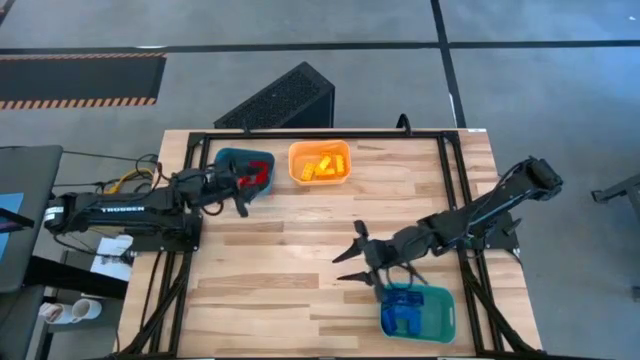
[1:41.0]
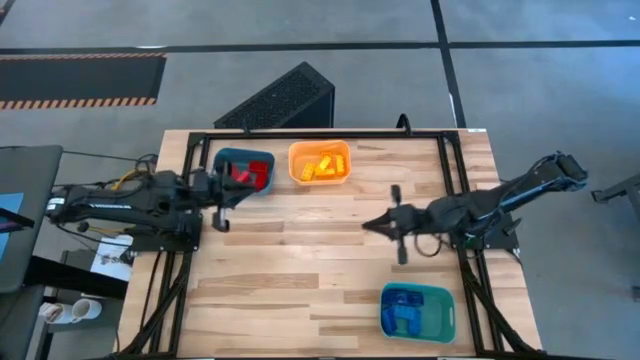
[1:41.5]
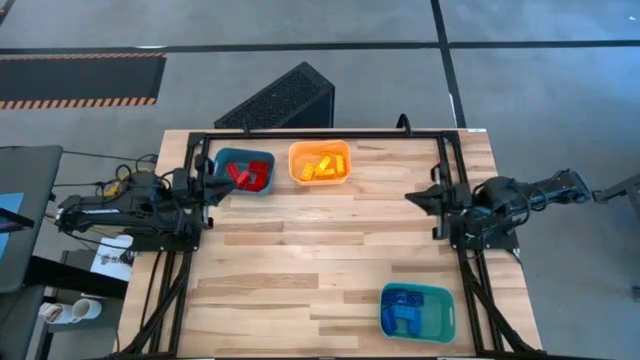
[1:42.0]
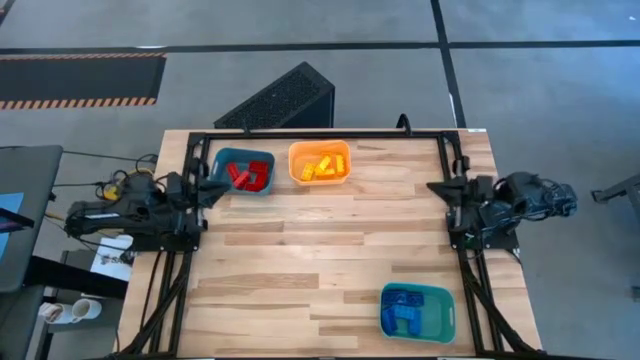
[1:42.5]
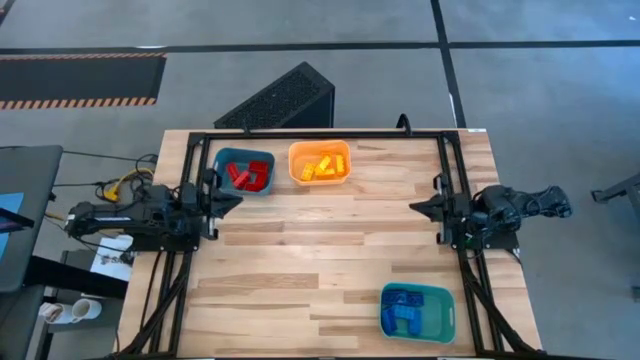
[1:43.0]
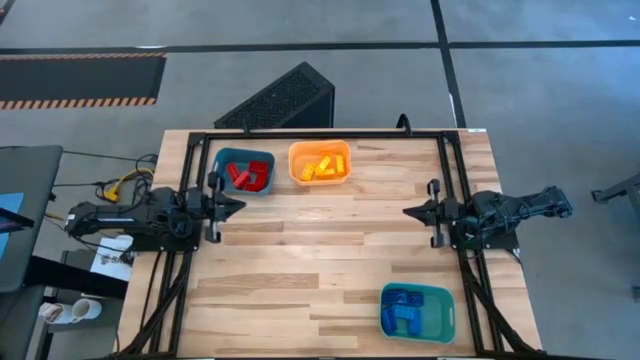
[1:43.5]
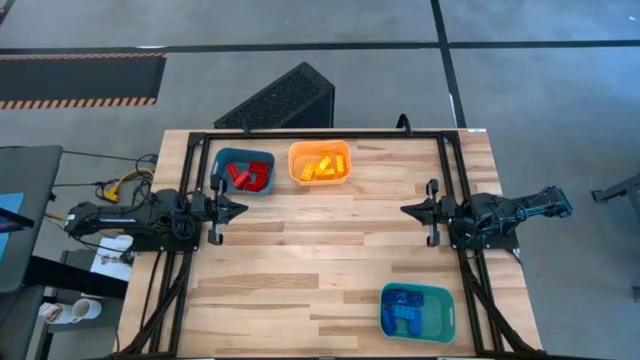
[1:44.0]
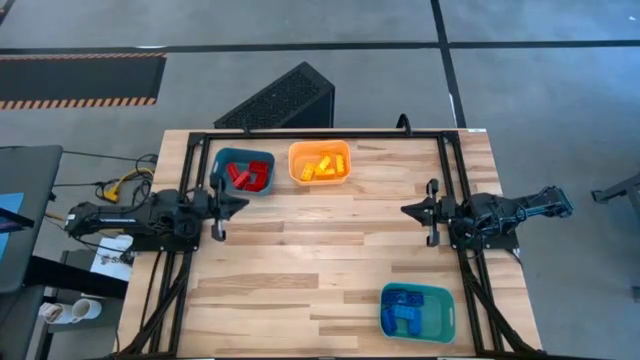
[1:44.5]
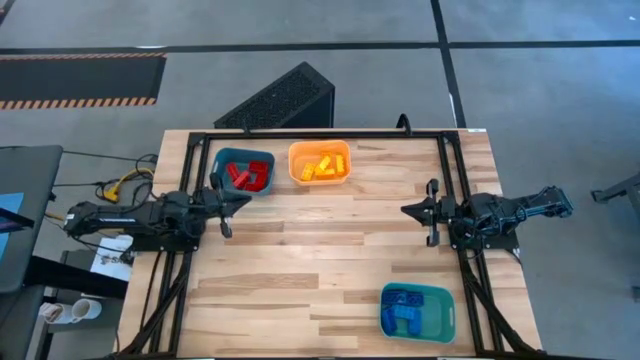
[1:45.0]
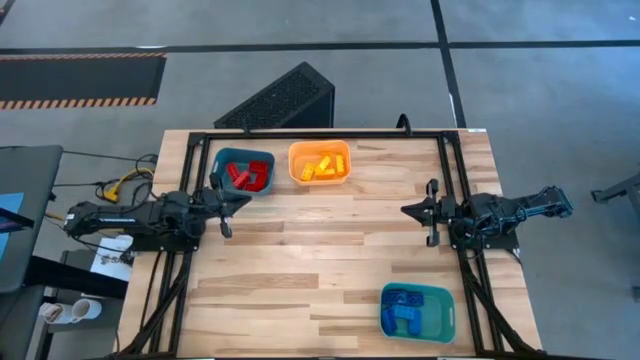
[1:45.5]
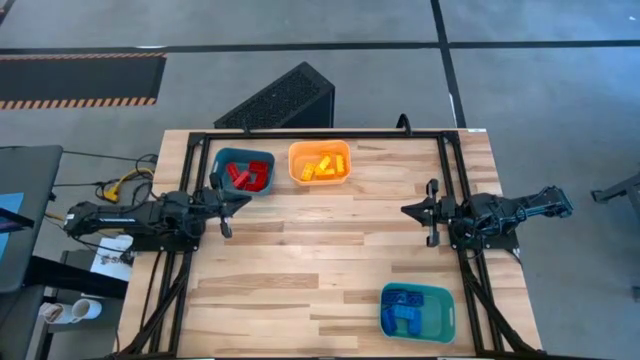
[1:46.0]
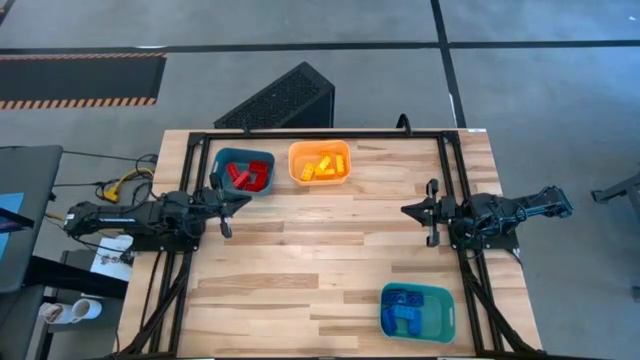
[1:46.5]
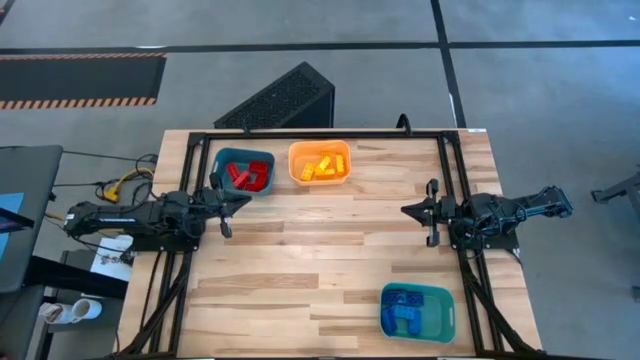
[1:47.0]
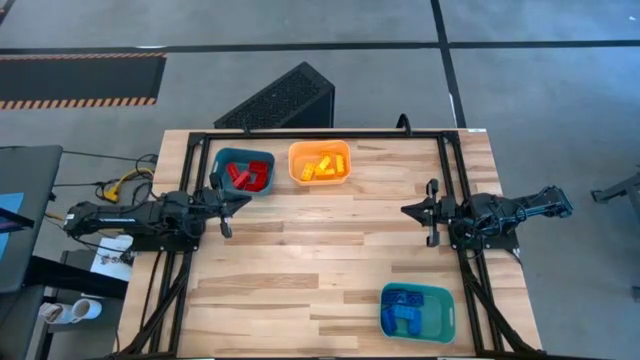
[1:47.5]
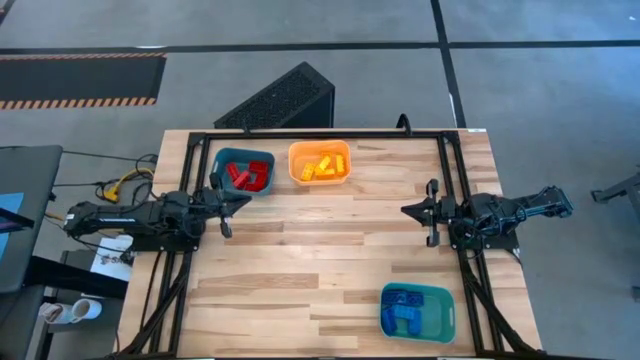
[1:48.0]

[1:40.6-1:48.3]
Task: Sort & place blocks by color
Return to Home Position

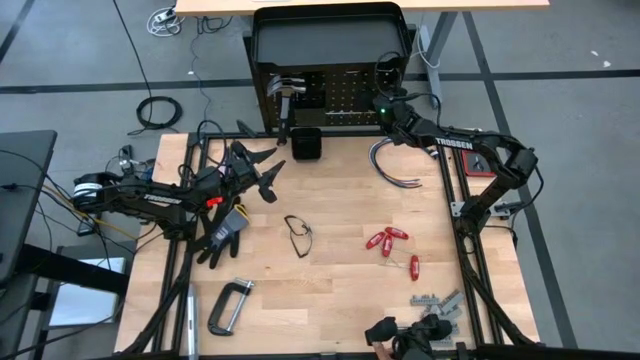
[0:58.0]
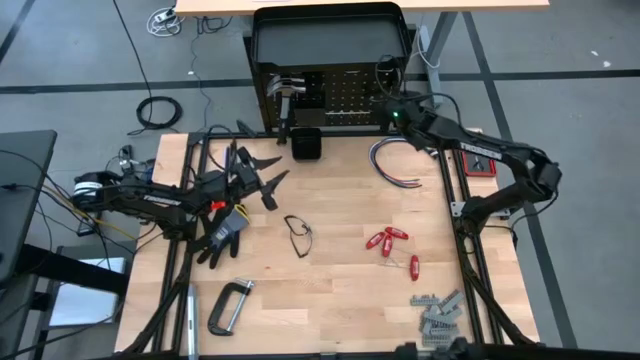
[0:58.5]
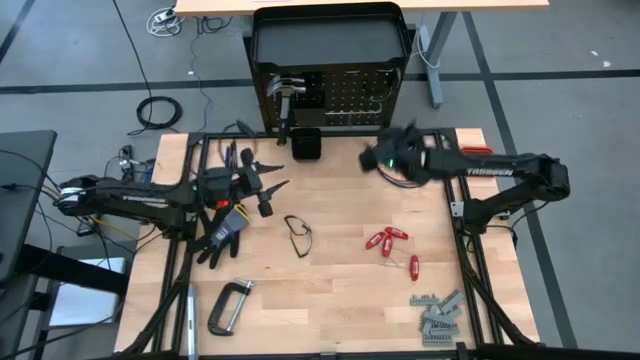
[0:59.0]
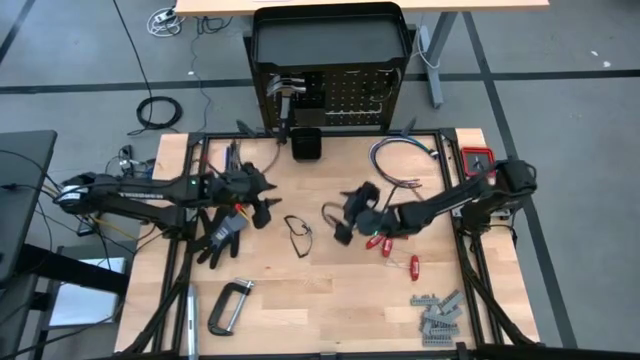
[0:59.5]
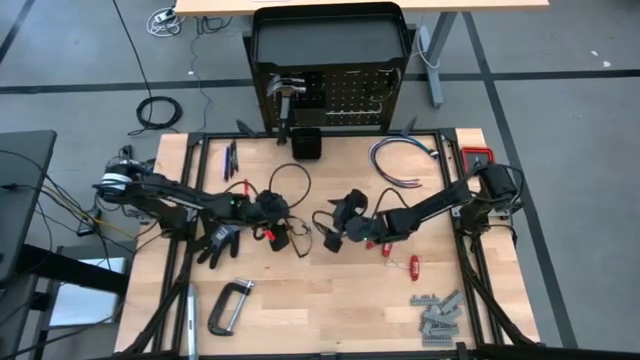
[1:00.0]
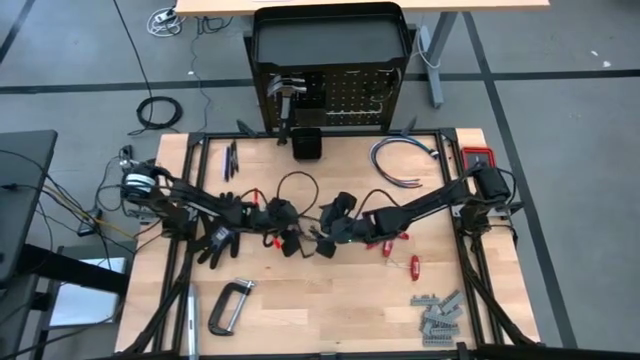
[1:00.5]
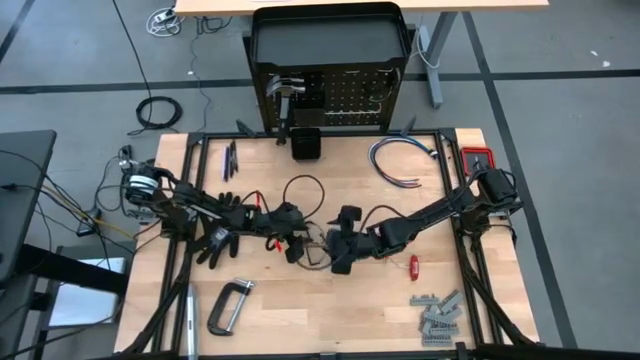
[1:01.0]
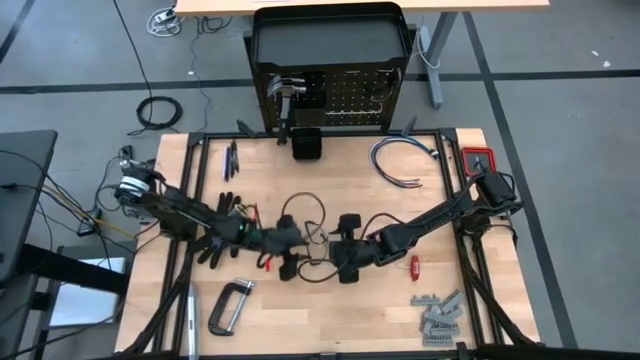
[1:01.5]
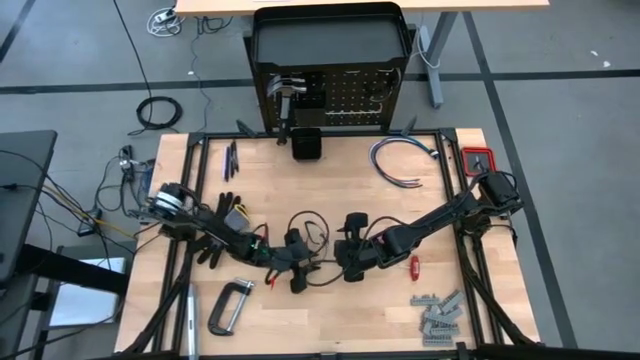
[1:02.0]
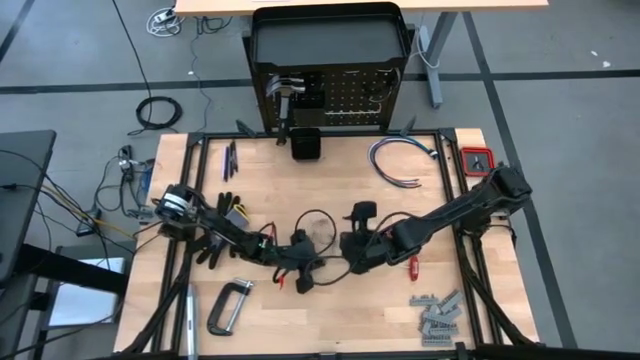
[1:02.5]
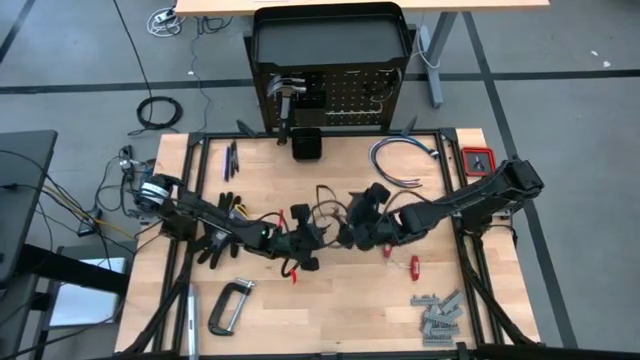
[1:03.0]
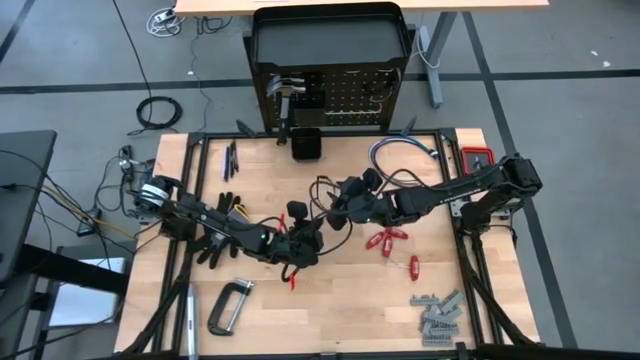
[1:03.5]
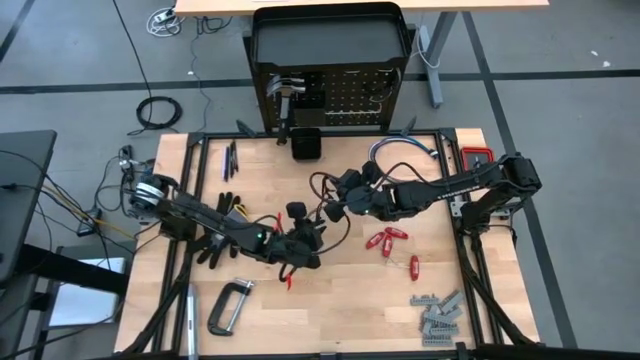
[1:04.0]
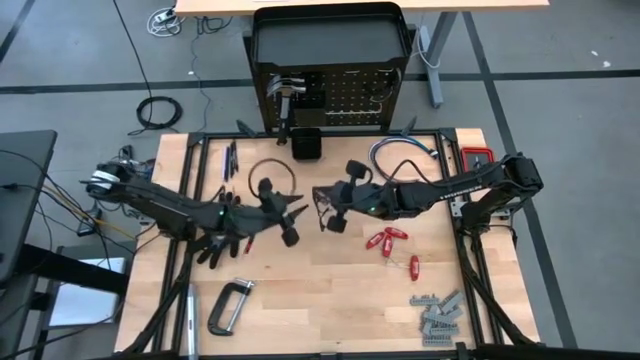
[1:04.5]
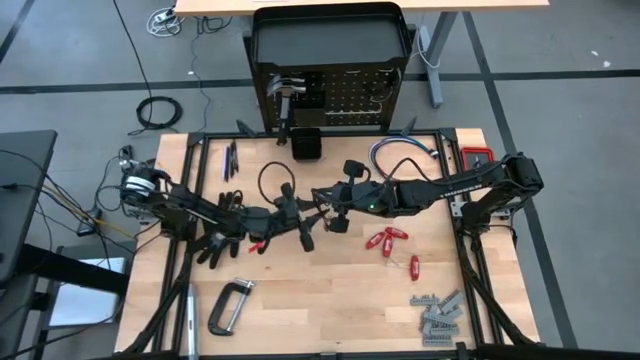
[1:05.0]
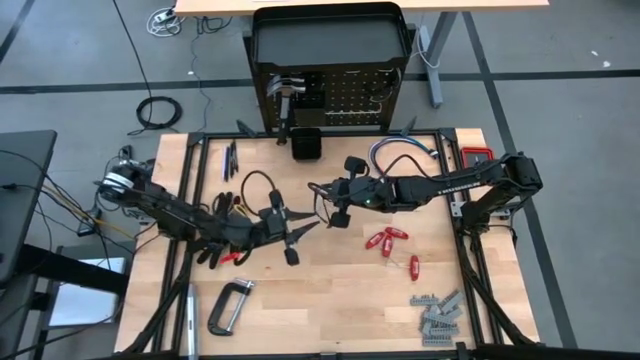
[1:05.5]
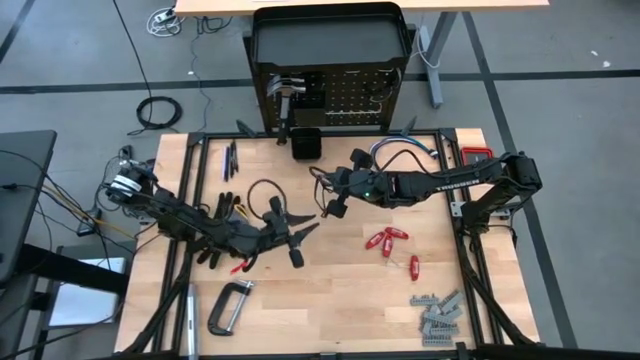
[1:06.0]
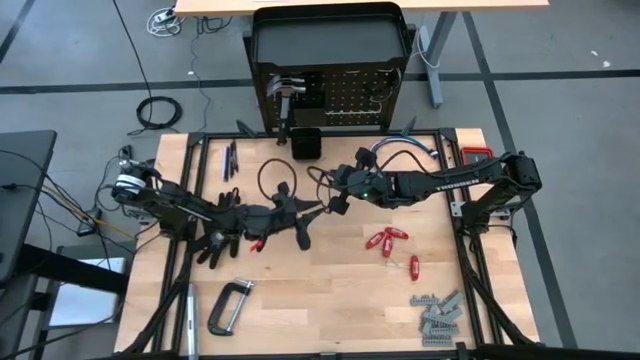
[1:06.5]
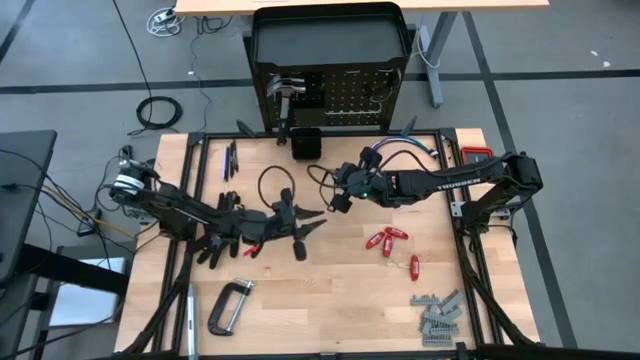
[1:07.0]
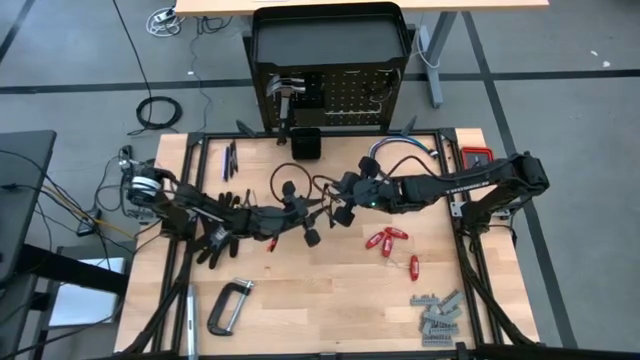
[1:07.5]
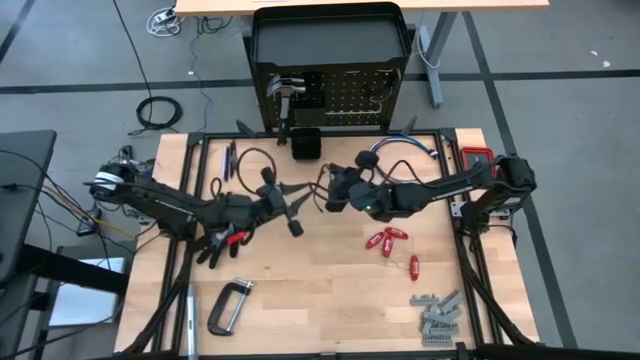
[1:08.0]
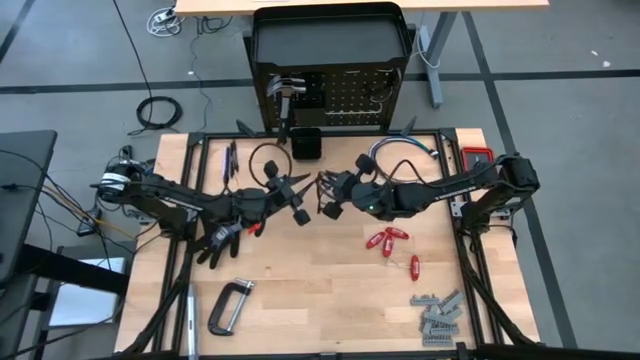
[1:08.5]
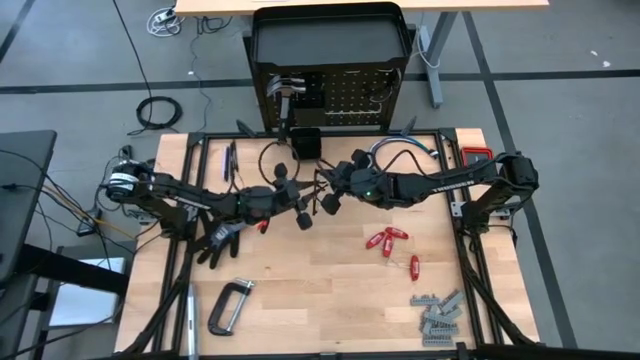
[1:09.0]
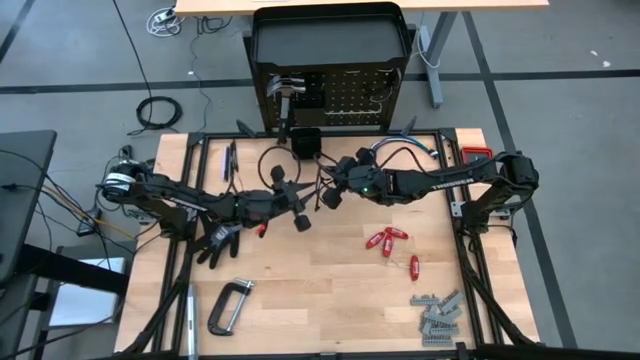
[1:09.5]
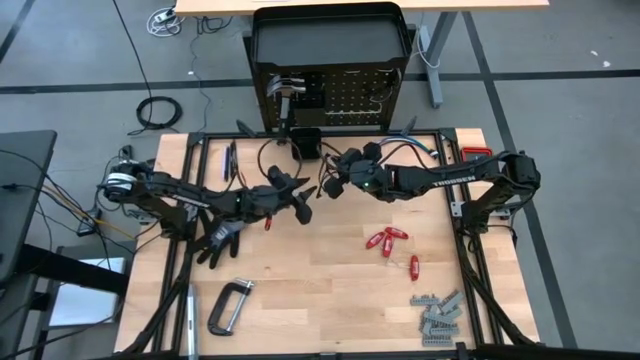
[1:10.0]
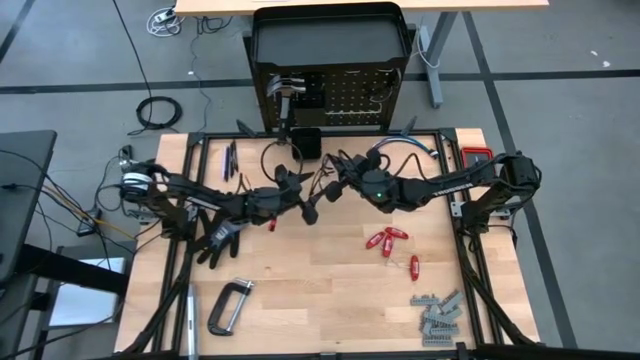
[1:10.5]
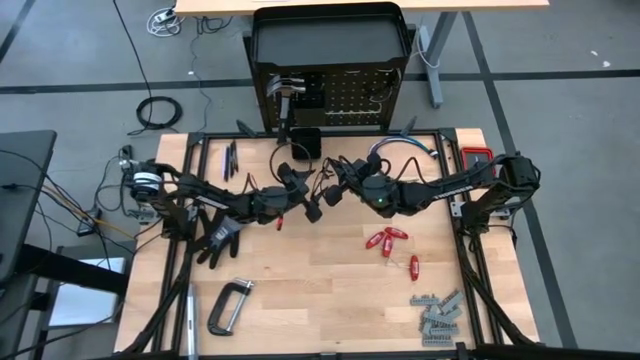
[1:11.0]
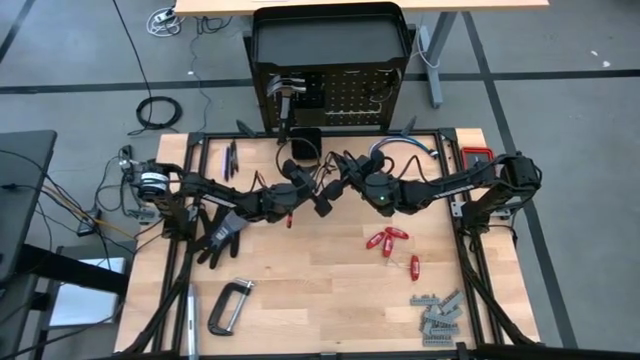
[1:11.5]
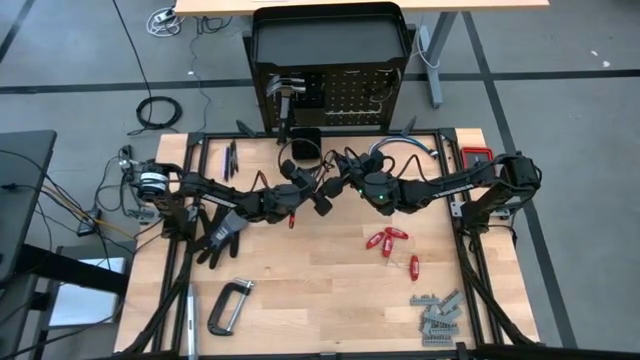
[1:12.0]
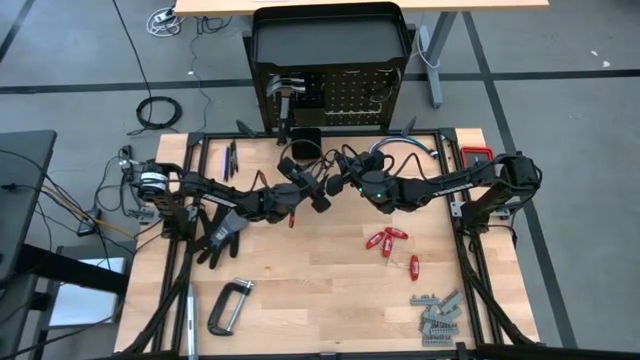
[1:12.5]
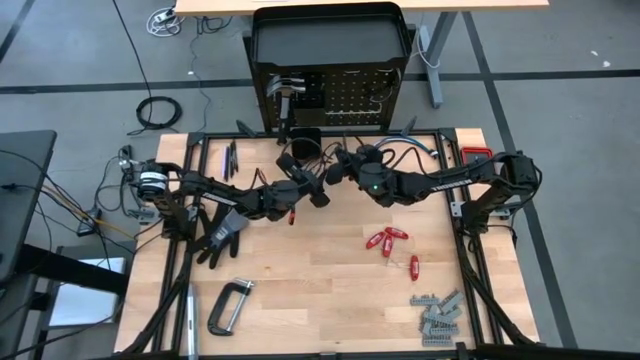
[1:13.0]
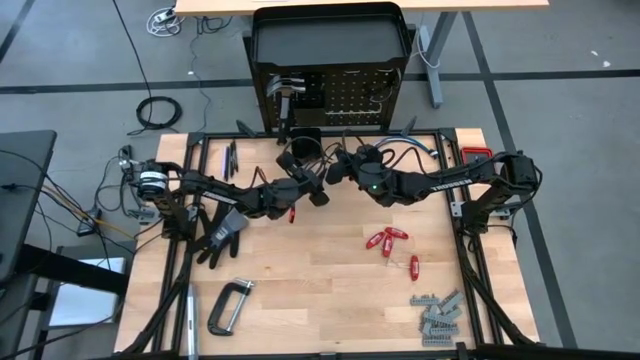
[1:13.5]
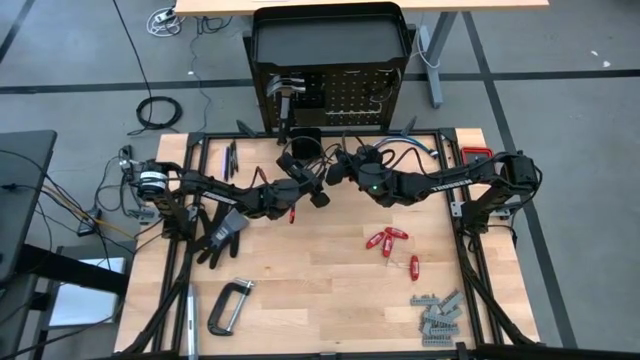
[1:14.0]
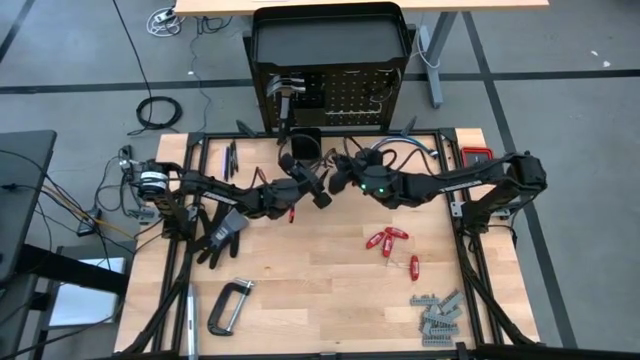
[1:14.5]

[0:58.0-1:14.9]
Task: Hang tools onto peg board
Hang the safety goggles on the peg board
